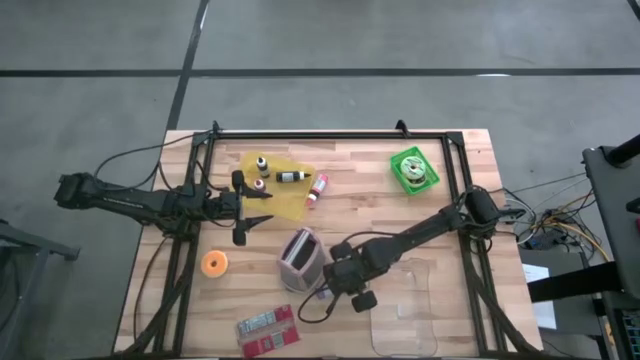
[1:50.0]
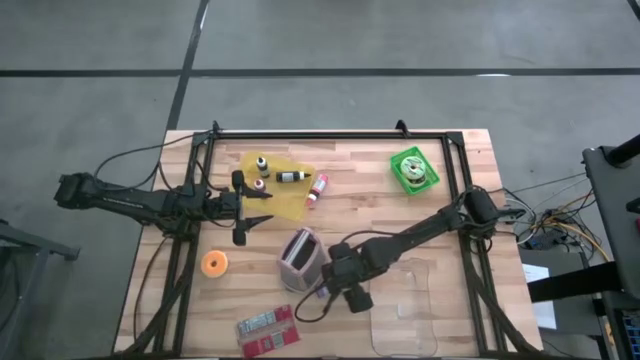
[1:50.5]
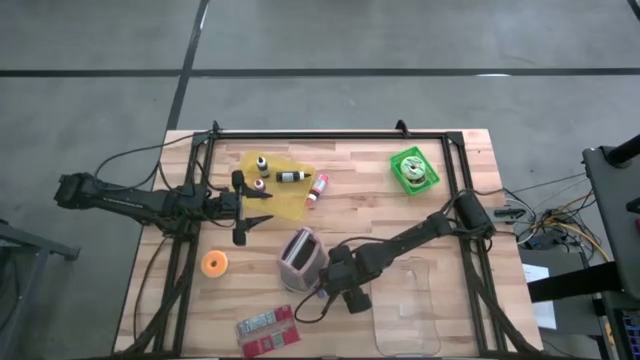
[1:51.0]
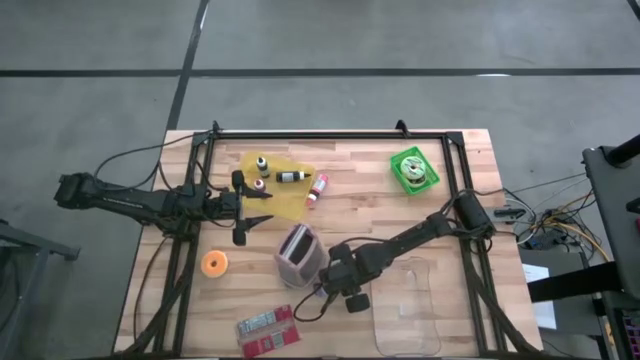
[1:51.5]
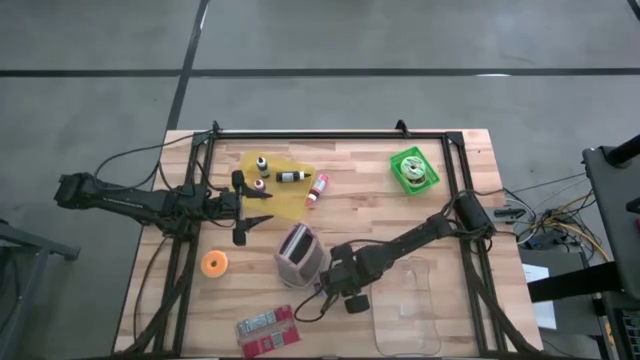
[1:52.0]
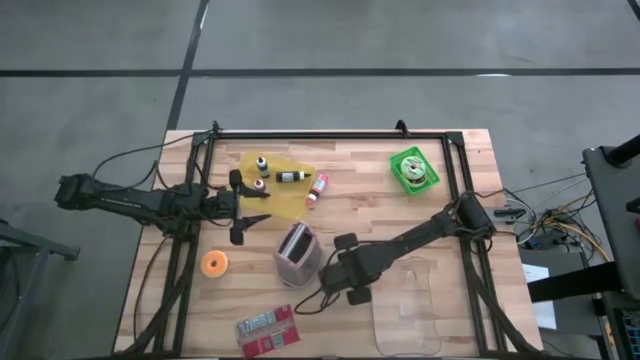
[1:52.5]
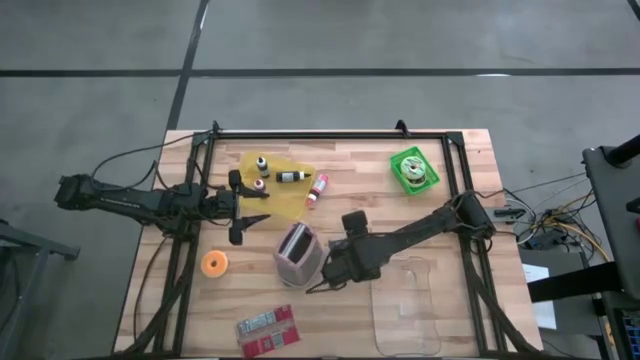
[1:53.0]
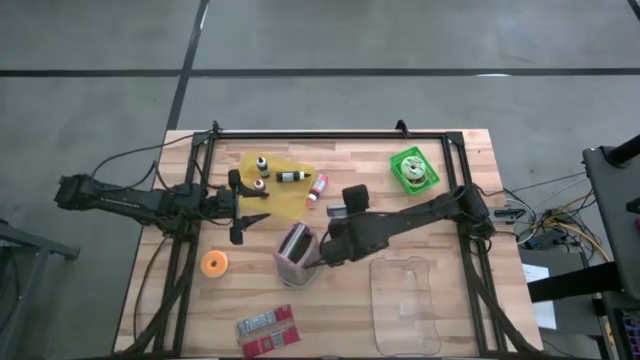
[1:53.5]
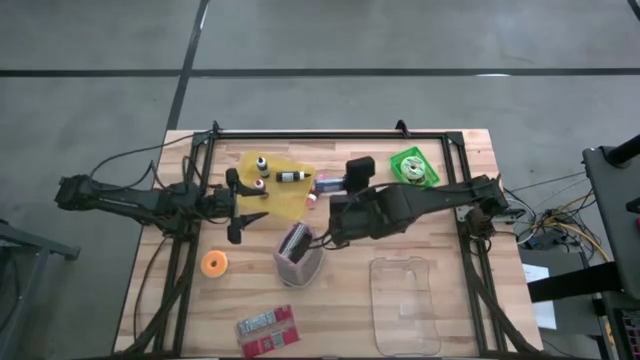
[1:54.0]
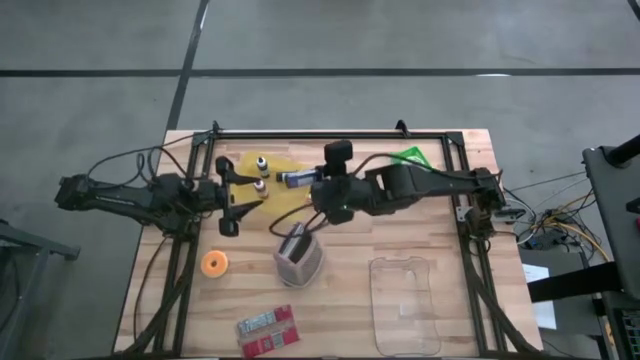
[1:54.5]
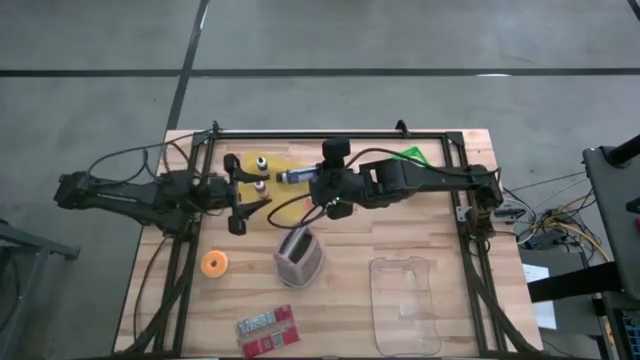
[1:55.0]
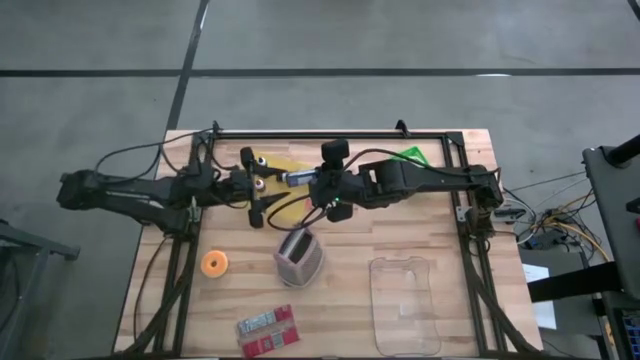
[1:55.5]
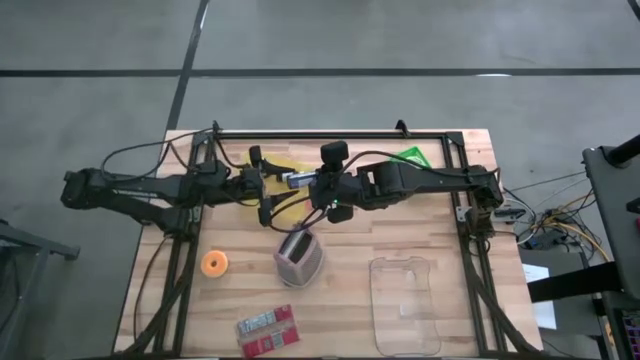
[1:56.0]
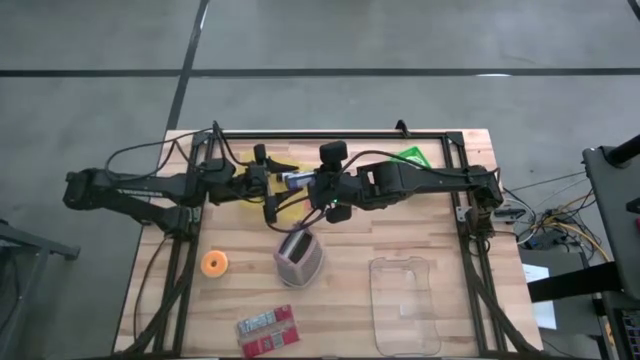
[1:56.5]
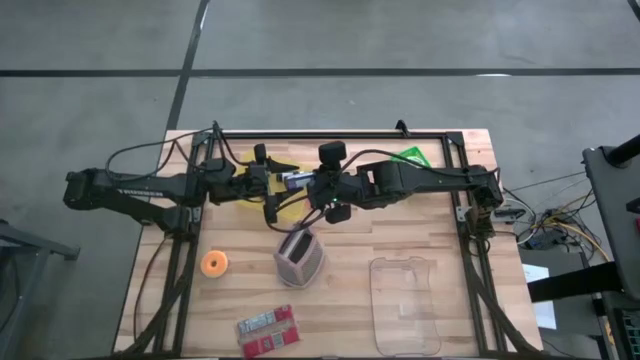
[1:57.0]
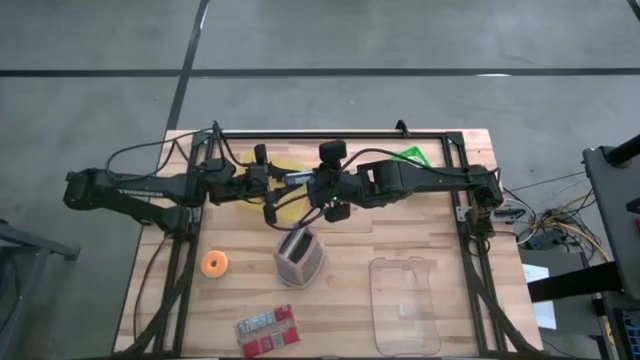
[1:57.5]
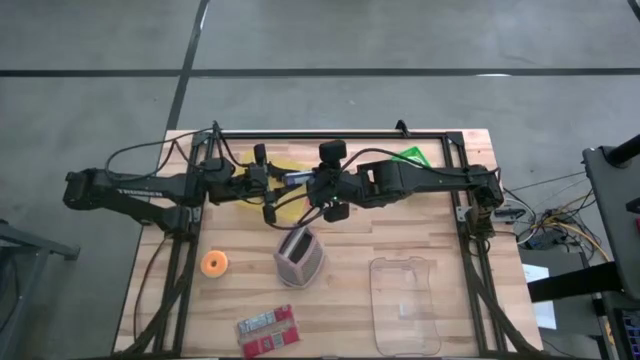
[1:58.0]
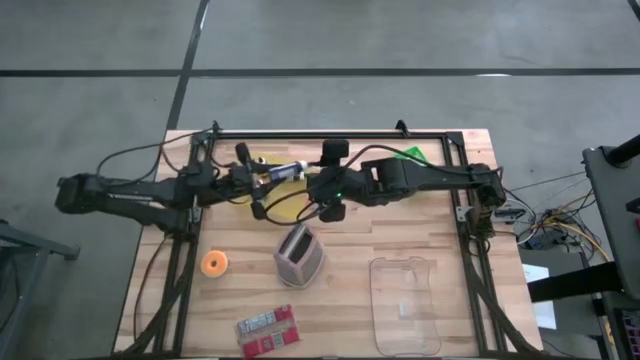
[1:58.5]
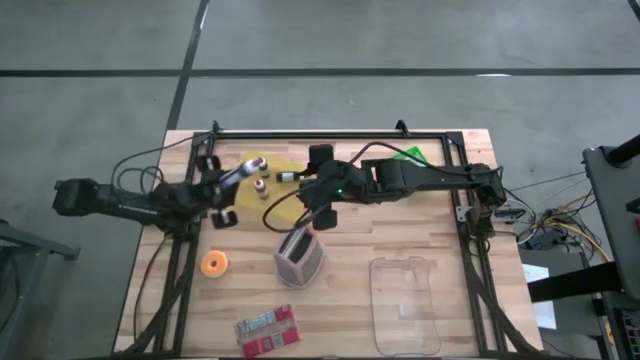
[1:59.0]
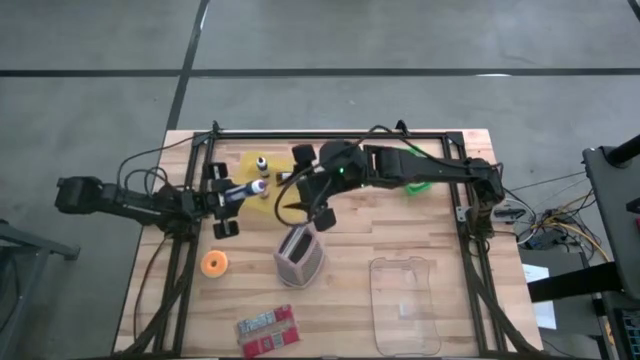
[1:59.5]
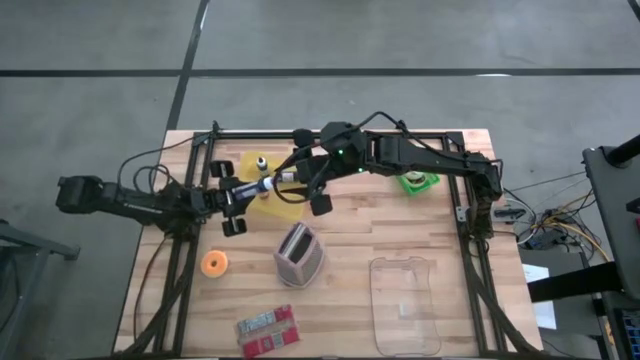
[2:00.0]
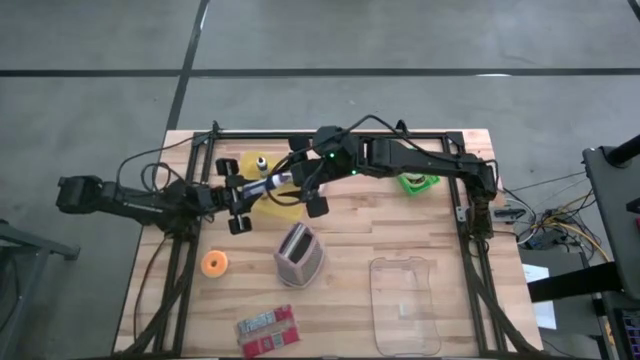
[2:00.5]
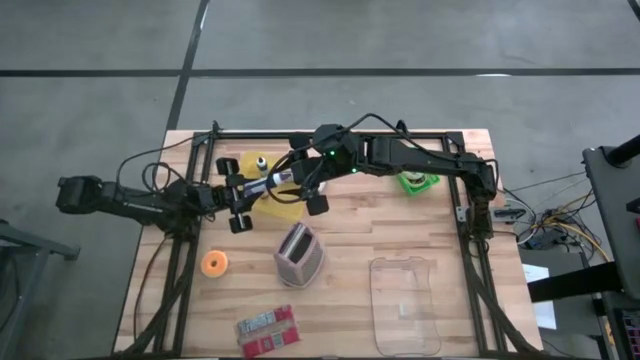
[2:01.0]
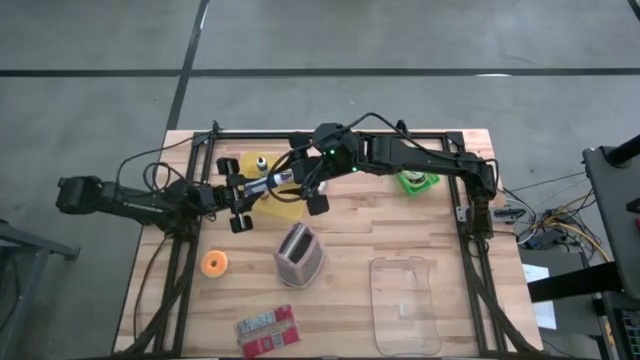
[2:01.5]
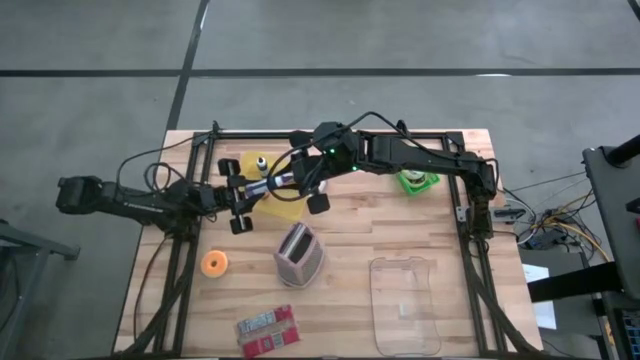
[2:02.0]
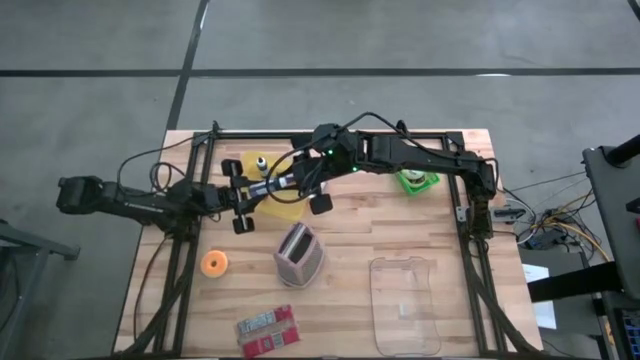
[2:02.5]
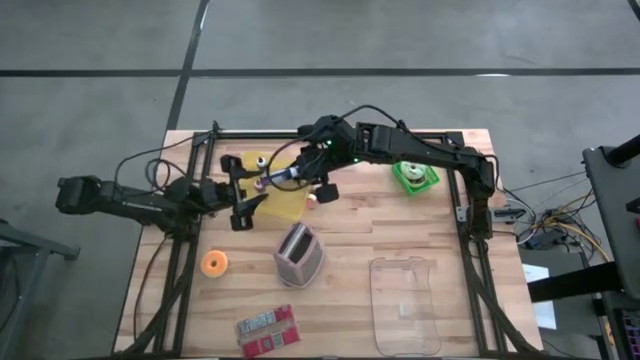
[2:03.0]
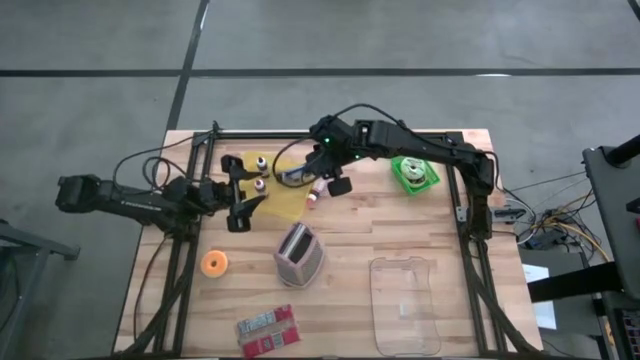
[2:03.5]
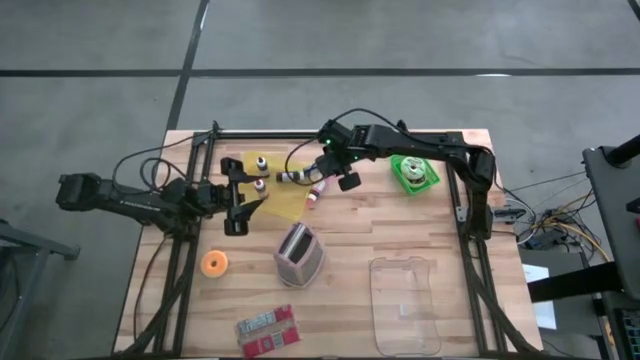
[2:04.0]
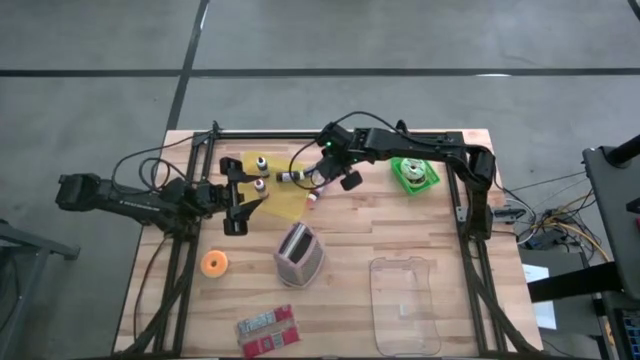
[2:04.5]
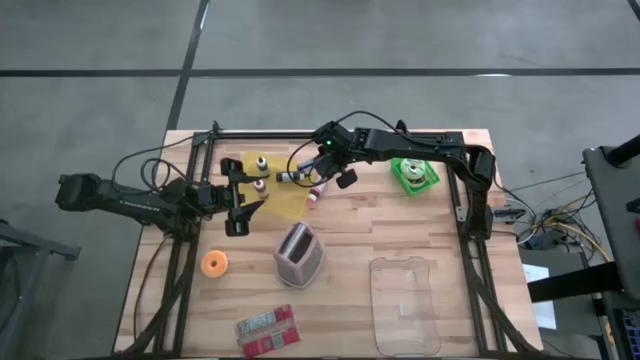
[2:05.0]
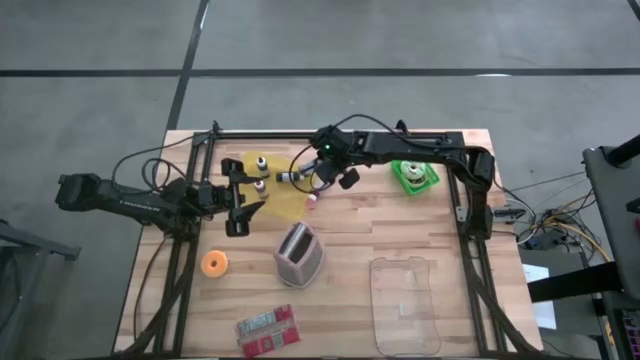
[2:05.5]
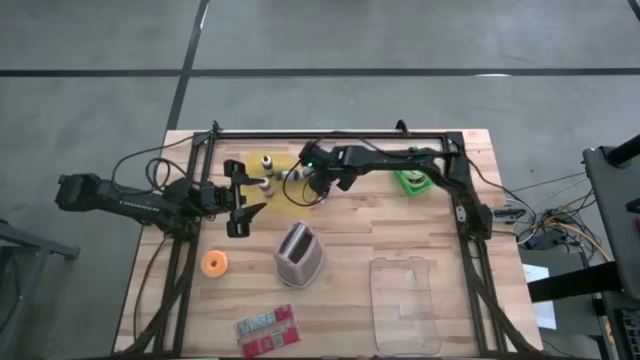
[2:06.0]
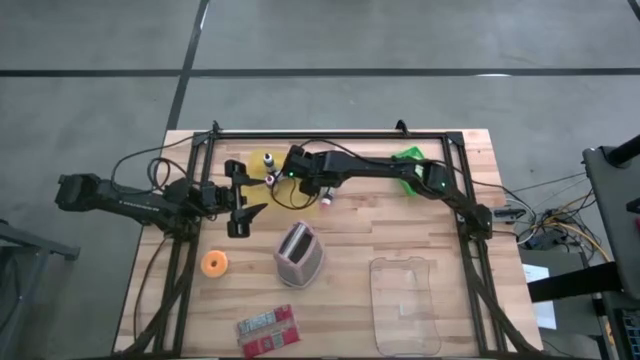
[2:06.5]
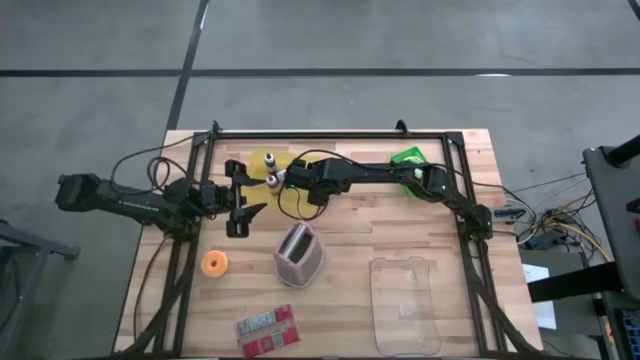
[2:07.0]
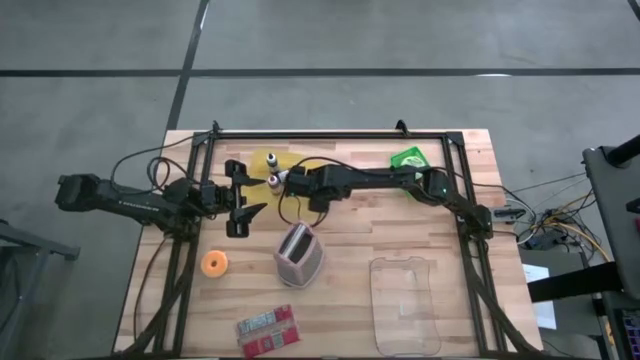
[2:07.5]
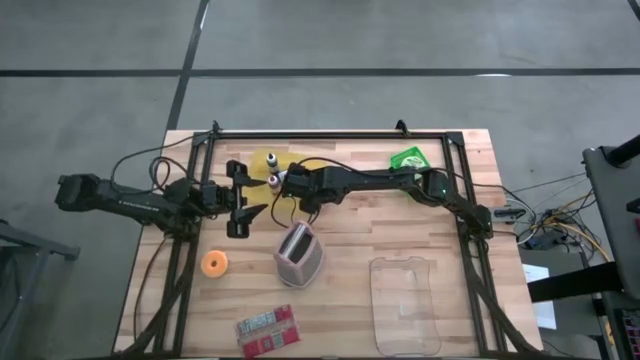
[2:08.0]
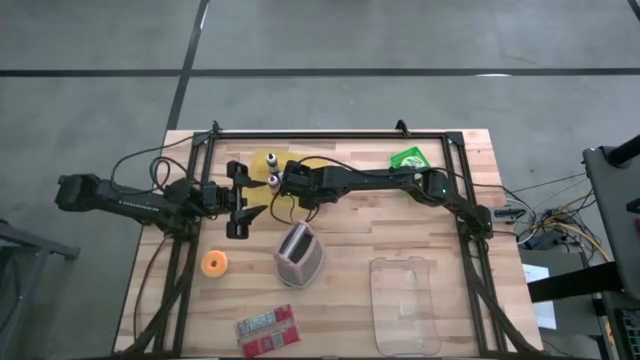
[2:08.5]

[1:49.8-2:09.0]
Task: Pick & Place Food Item
Put the violet food coloring into the yellow bin

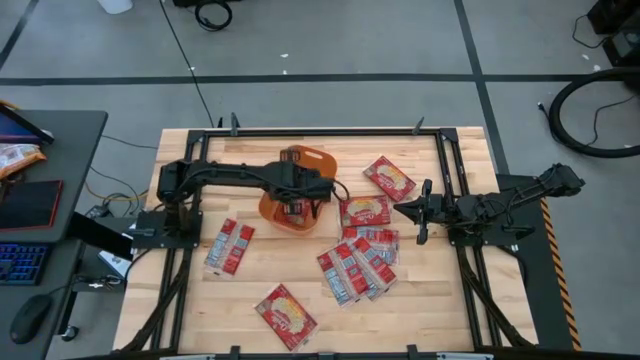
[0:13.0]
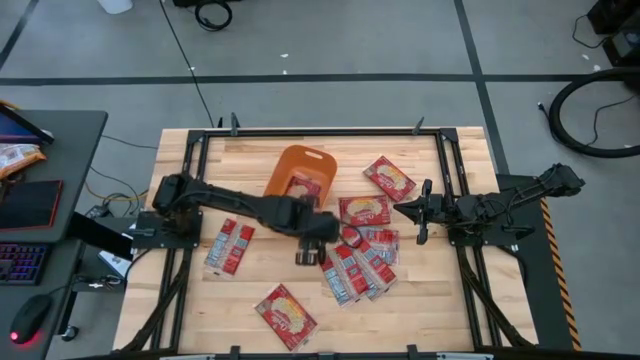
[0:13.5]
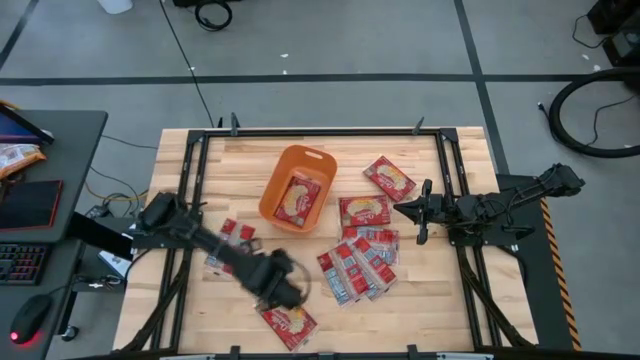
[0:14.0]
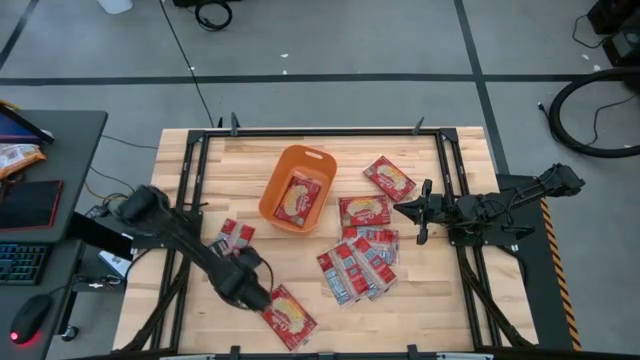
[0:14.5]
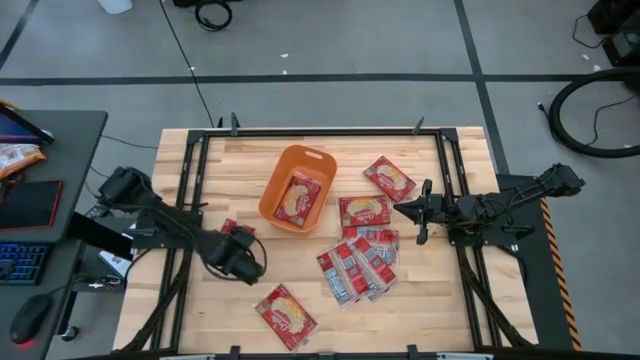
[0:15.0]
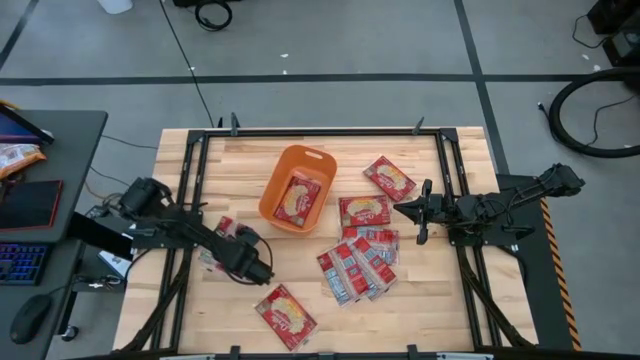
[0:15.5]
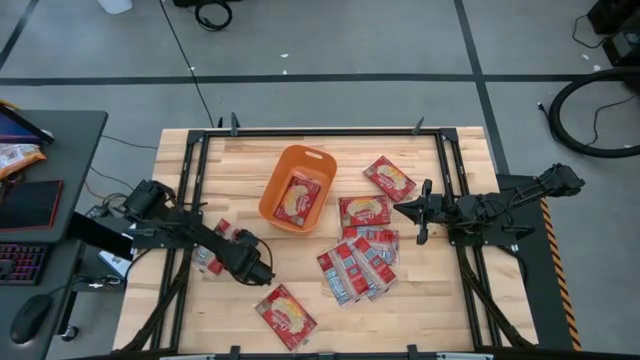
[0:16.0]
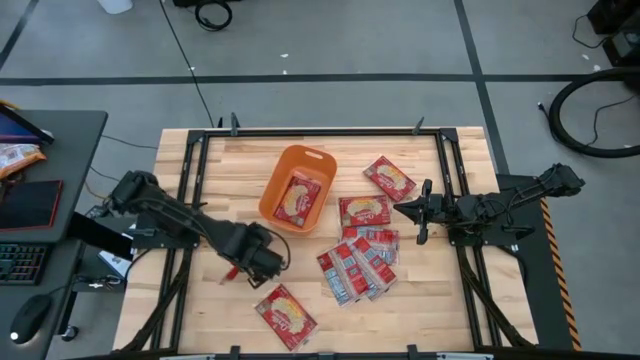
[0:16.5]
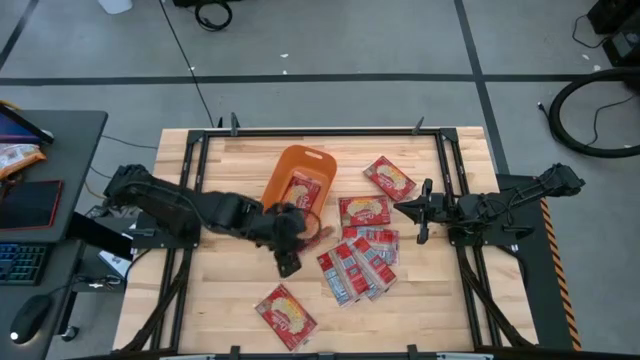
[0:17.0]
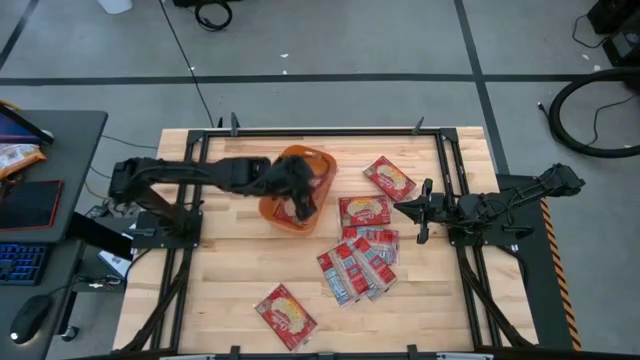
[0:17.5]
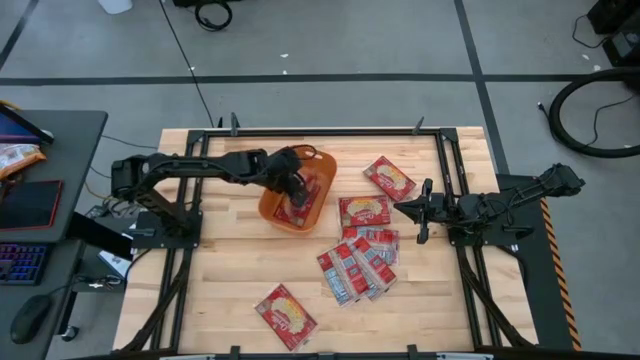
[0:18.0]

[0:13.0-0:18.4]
Task: Sort popcorn bags into baskets
Put the red popcorn pack into the orange bin
